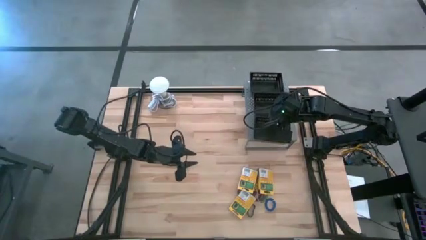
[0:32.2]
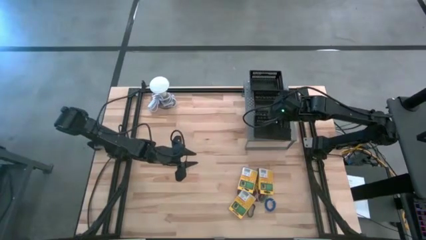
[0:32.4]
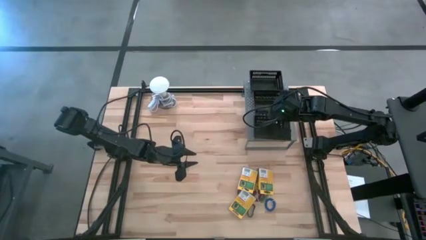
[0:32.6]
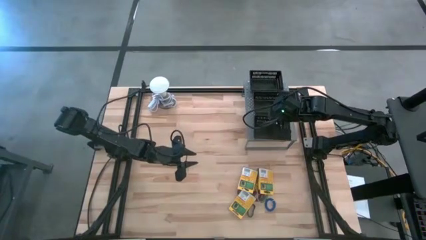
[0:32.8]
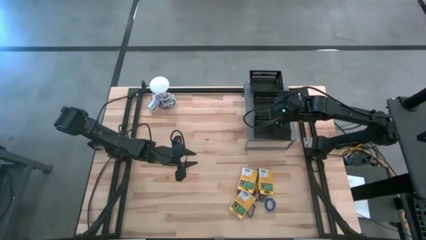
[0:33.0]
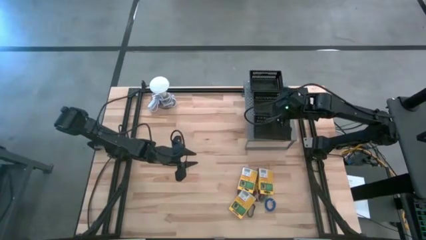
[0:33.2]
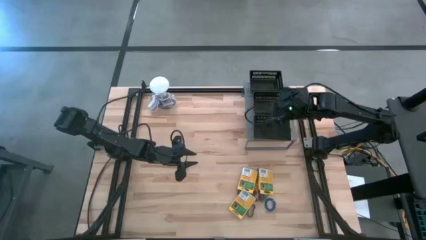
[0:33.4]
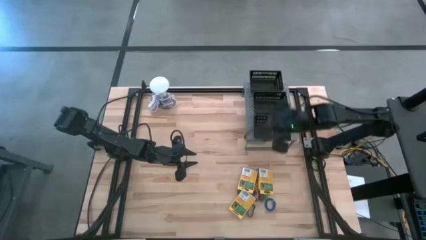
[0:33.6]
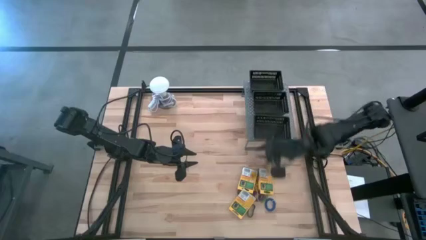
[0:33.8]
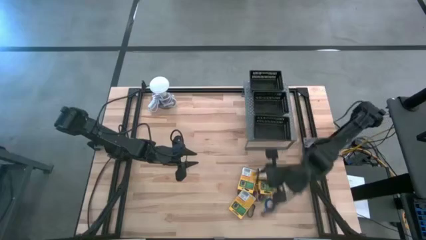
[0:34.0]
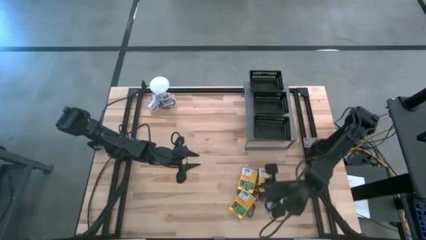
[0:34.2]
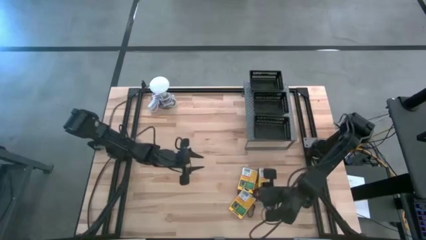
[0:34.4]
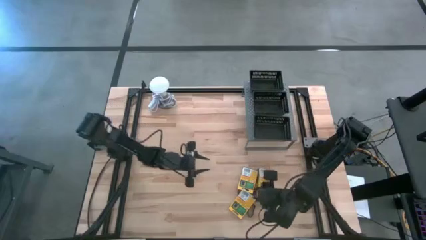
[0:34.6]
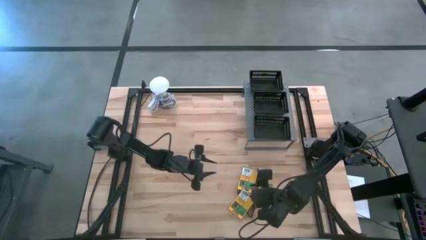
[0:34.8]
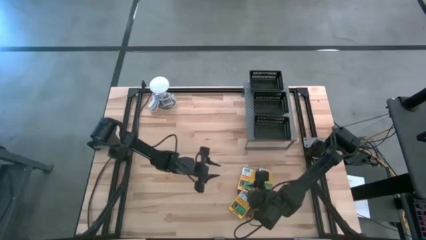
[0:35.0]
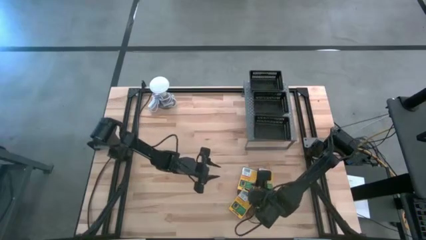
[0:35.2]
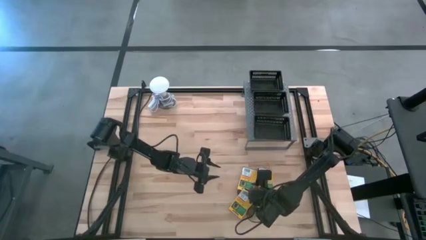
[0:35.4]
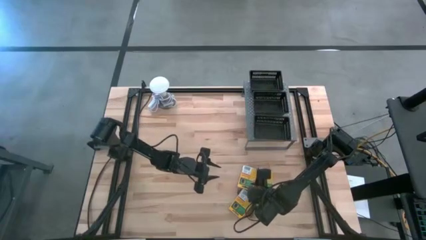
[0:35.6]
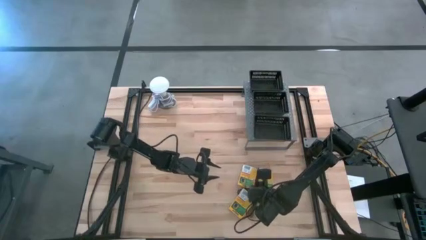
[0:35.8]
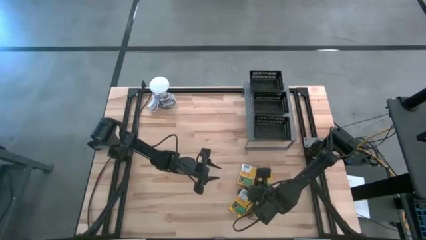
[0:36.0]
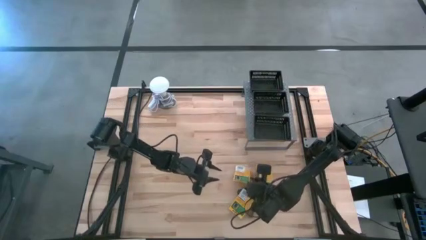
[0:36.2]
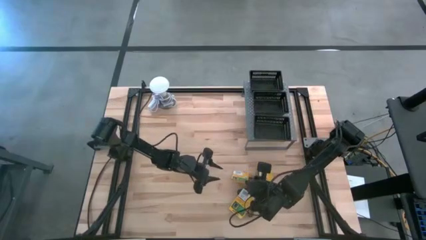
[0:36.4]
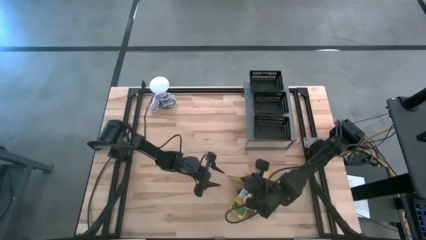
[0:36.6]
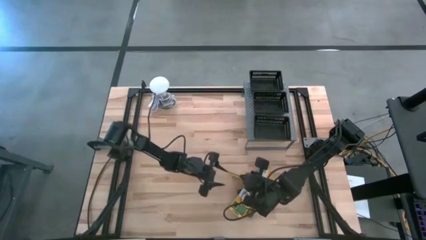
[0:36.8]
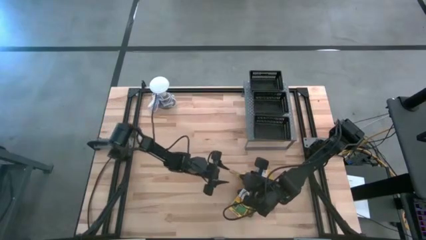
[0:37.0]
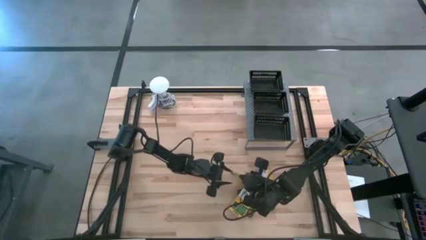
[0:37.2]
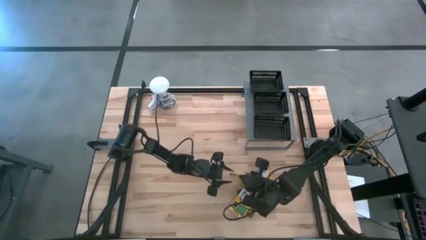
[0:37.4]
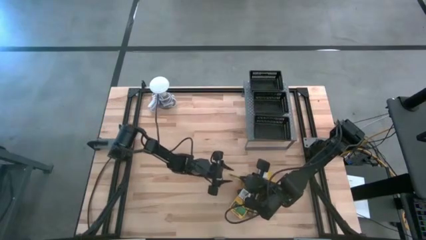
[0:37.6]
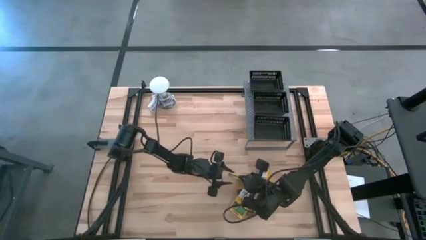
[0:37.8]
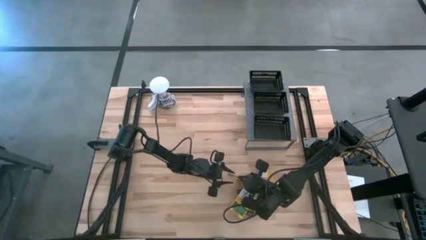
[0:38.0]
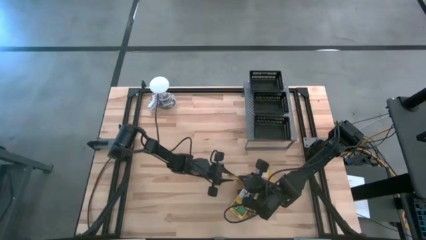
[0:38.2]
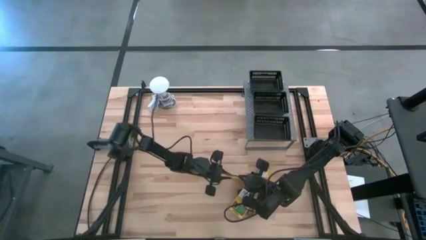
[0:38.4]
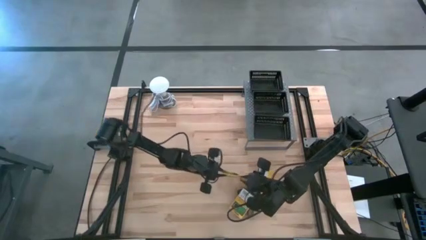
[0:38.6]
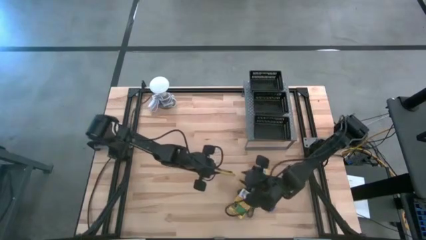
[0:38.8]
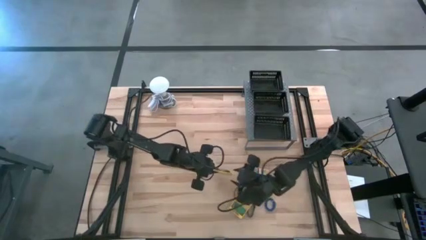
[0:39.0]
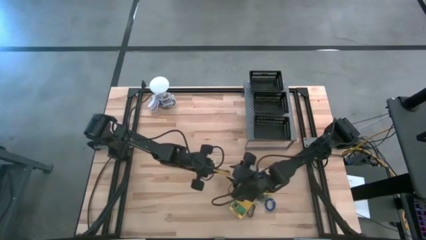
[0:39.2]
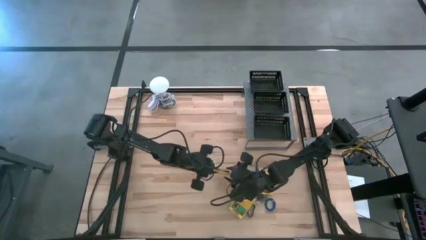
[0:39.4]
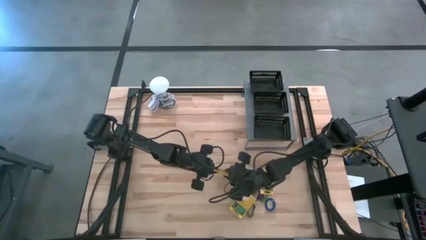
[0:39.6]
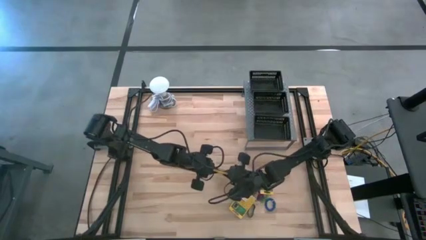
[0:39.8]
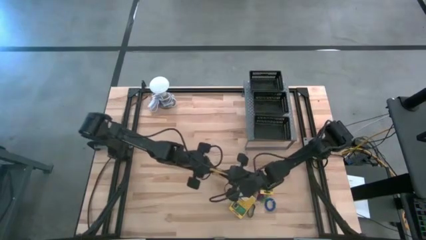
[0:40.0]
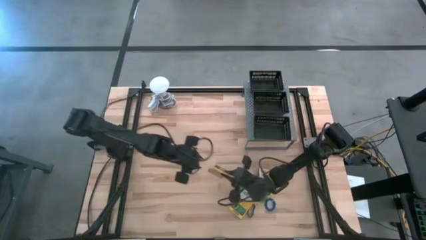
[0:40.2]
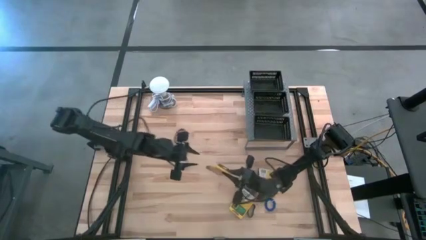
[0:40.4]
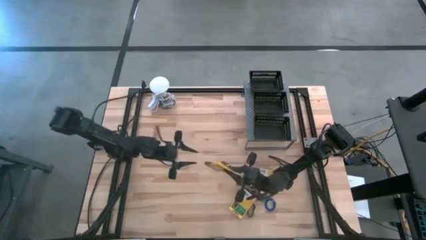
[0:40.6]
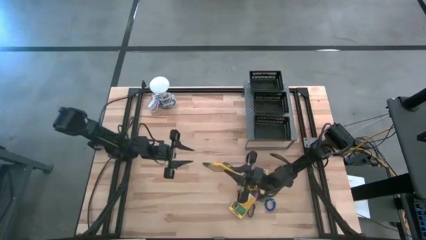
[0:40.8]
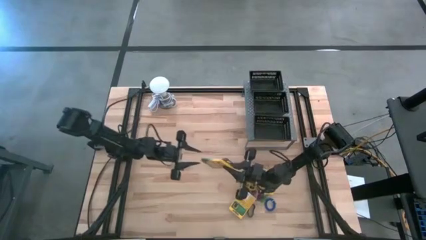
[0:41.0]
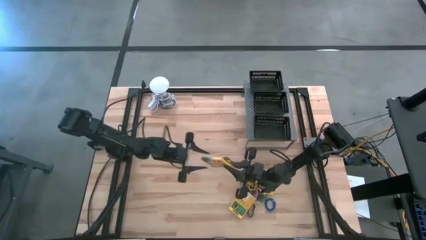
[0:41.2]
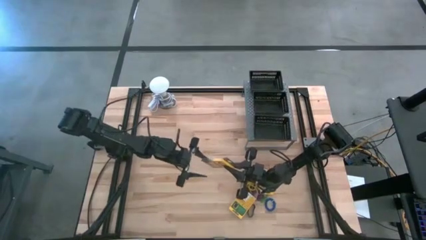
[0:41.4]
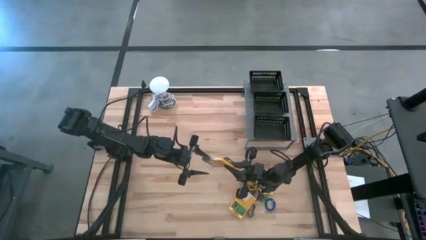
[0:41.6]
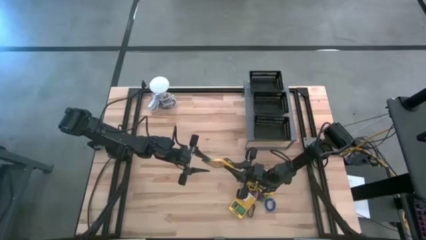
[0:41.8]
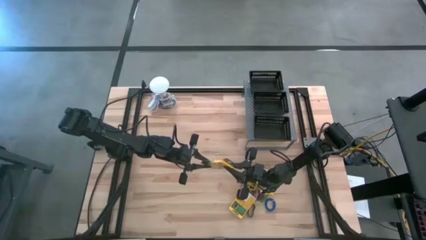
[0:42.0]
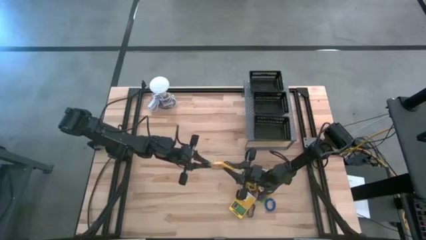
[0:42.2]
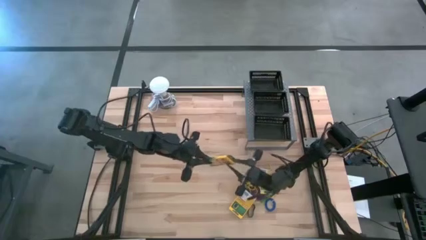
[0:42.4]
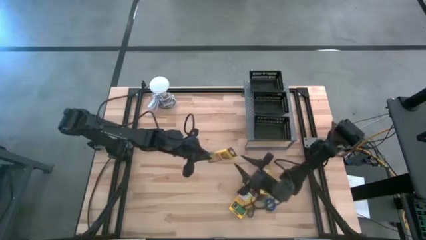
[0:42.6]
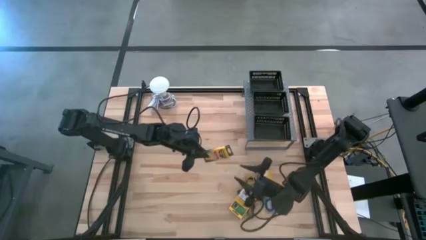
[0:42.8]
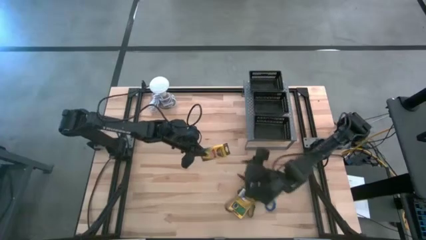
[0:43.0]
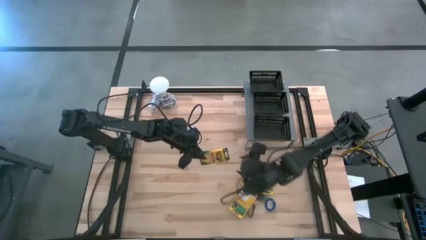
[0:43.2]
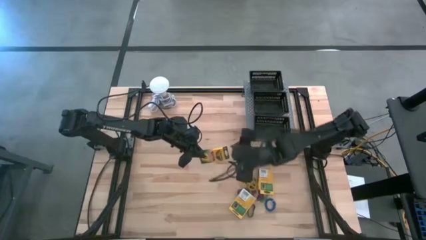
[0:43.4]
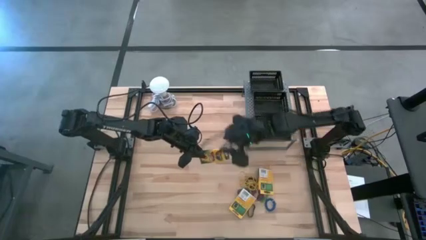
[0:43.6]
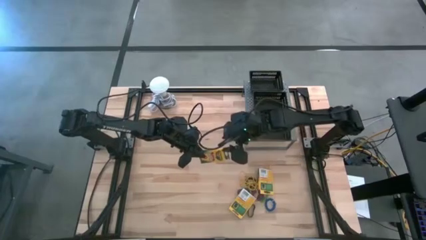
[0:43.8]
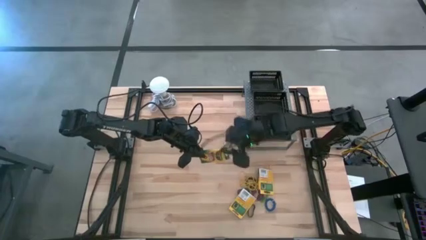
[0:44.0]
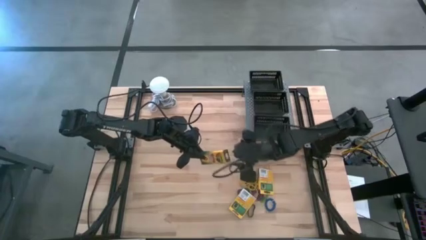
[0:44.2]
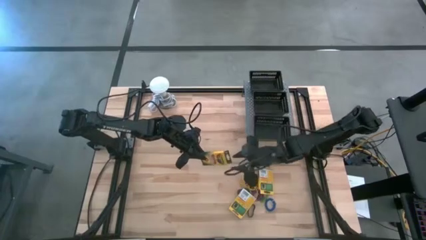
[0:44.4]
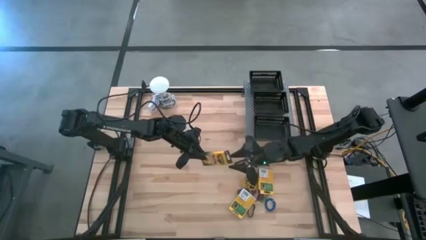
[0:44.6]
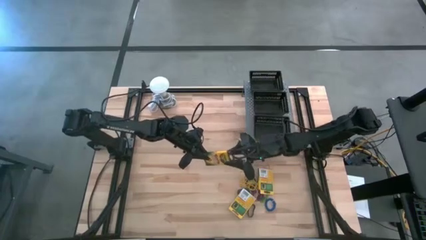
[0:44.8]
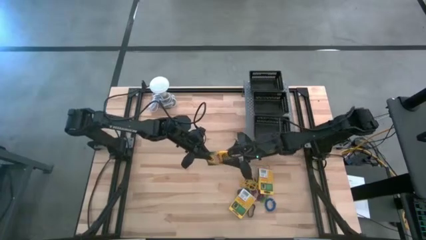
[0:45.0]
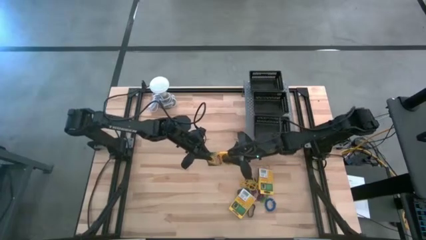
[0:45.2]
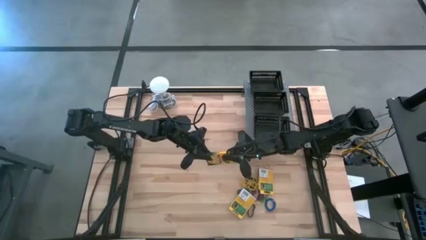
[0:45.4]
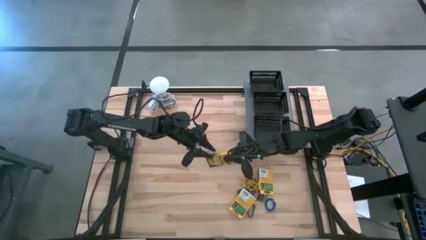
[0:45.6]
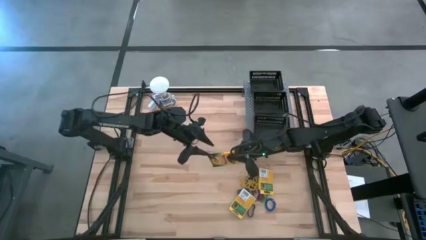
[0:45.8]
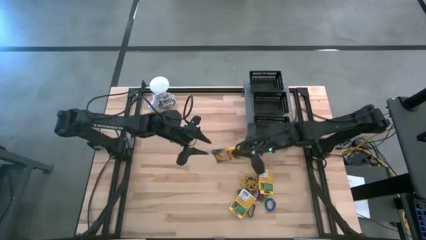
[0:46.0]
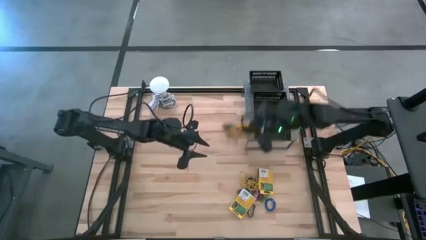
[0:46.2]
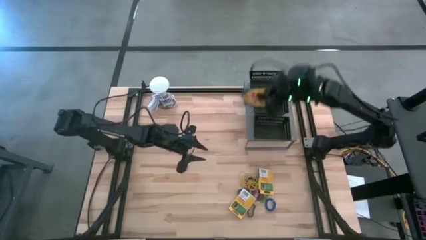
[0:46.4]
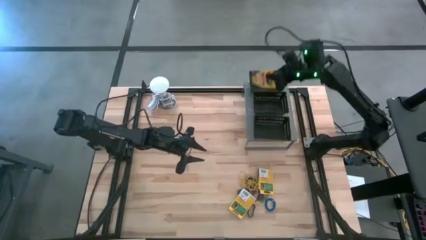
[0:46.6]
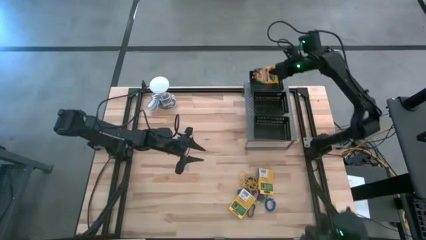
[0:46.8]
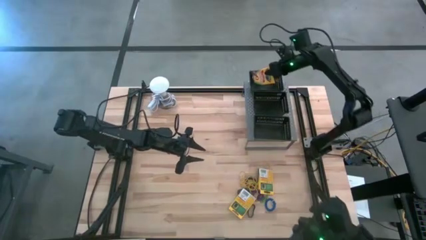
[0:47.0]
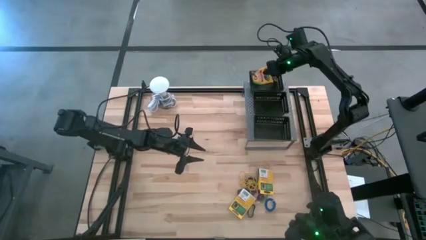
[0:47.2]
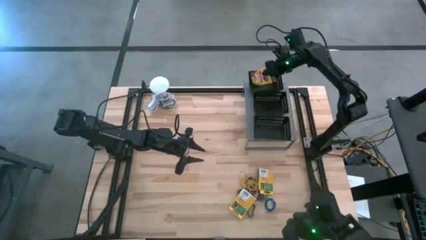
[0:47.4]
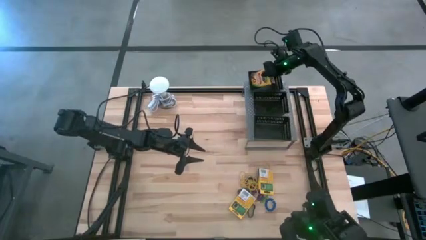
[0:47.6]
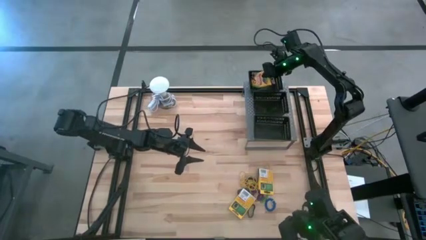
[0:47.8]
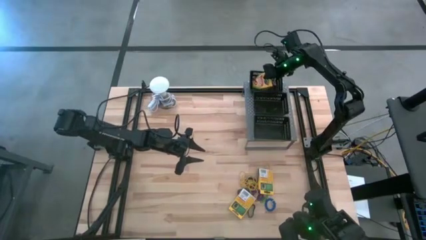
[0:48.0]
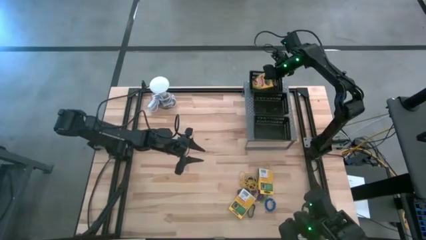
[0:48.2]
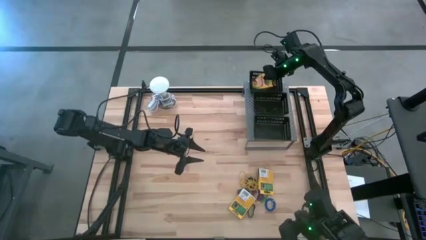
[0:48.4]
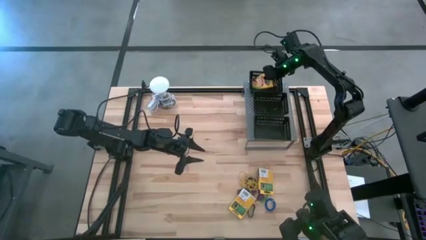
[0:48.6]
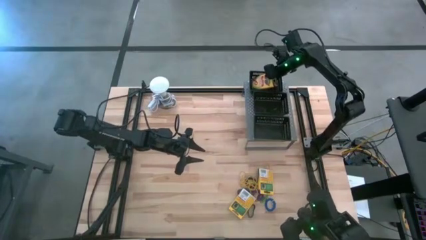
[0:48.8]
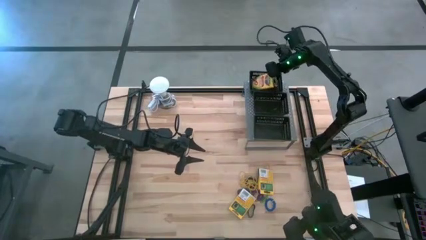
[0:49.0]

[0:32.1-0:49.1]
Task: Pick & Place Office Desk Supplies
Put the crayon box into the top black bin on the shelf
